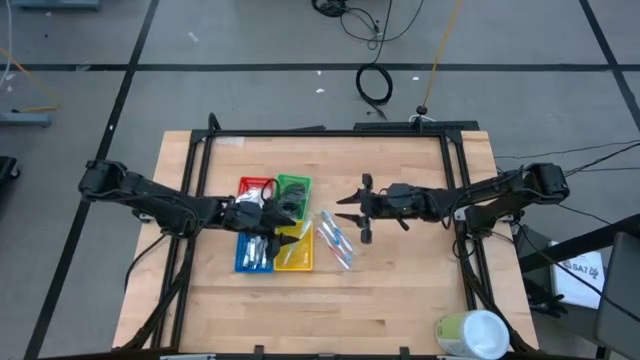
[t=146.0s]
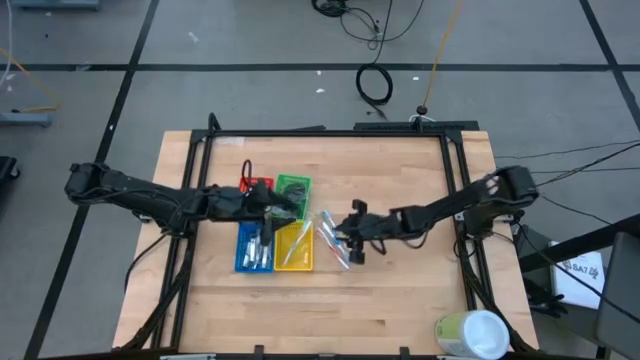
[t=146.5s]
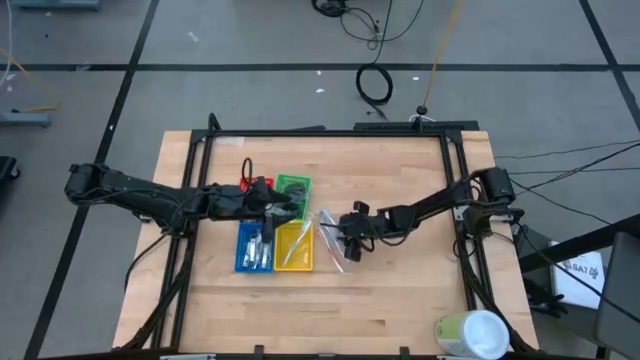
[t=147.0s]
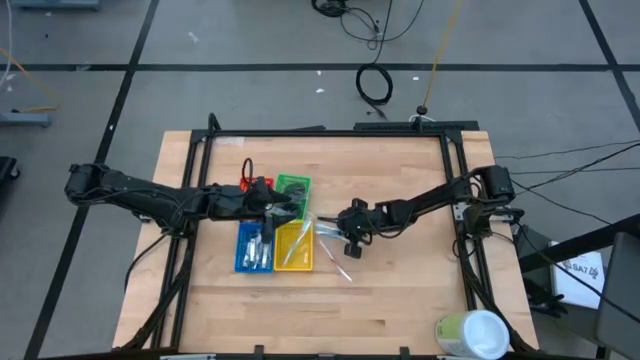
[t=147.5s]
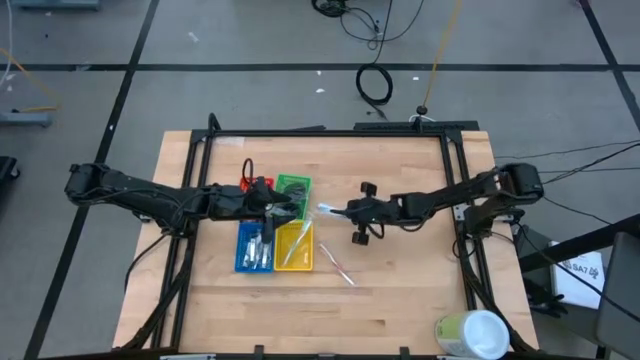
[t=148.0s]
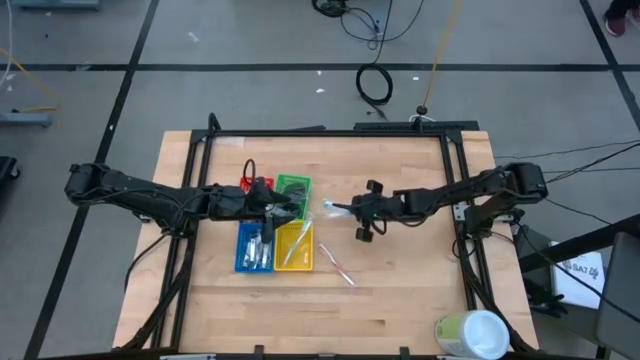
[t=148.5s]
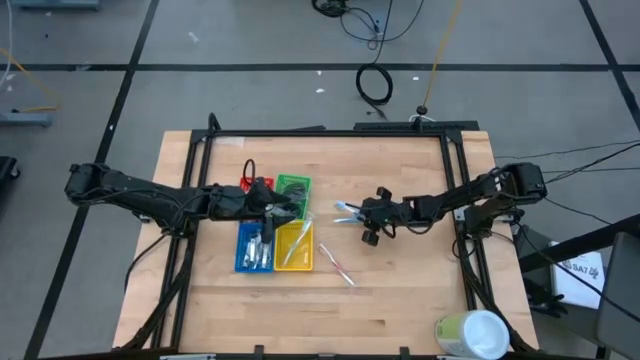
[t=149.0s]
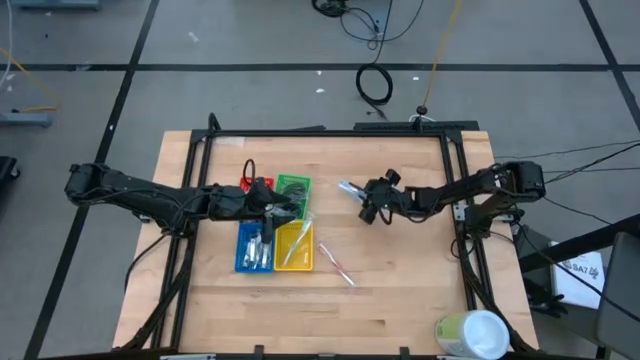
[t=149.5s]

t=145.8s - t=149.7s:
Task: Pick & Place Travel size toiletries
Put the blue toothbrush into the yellow bin

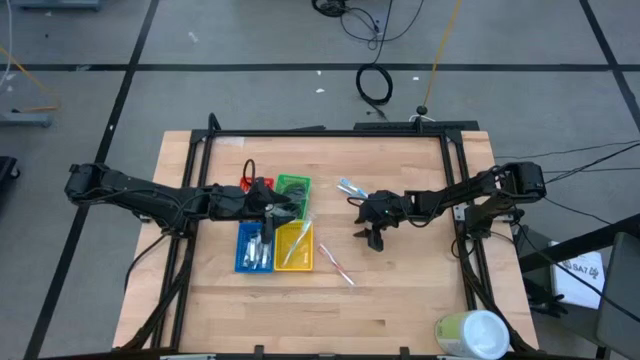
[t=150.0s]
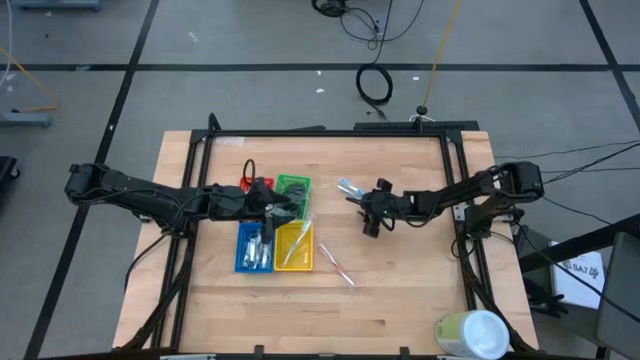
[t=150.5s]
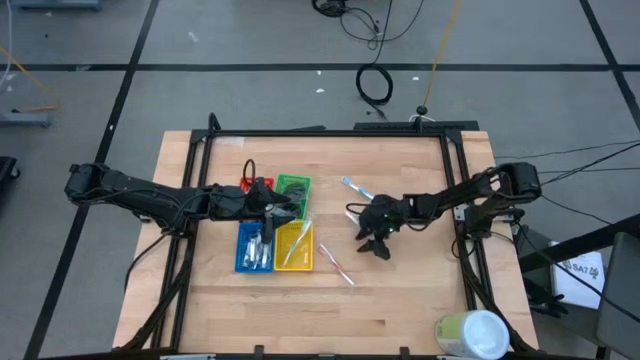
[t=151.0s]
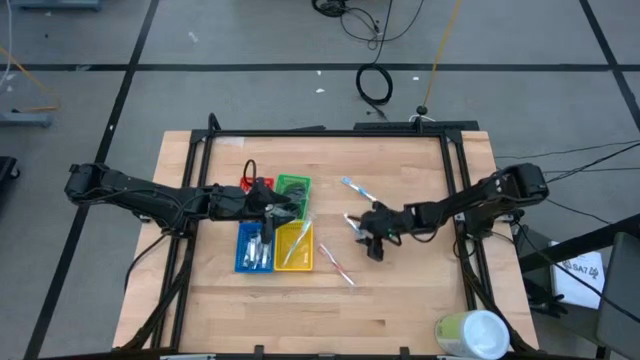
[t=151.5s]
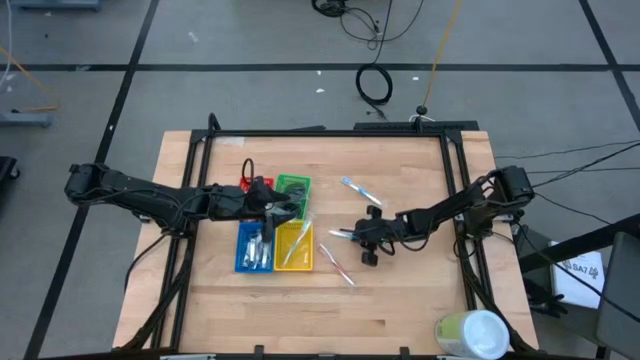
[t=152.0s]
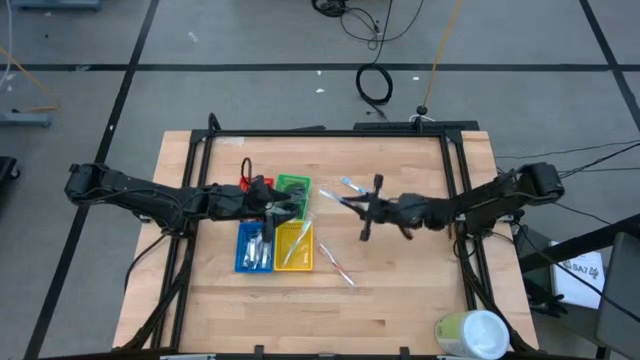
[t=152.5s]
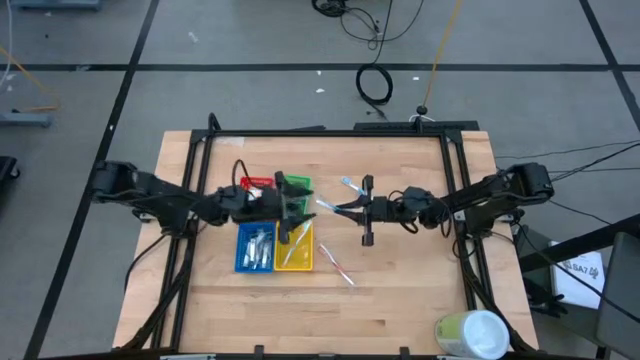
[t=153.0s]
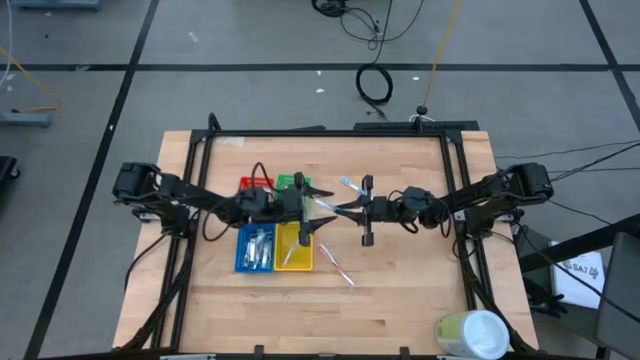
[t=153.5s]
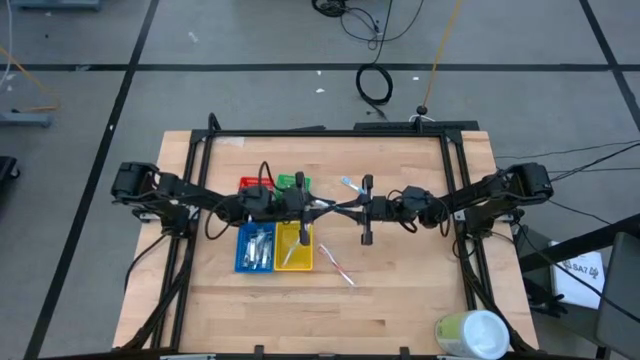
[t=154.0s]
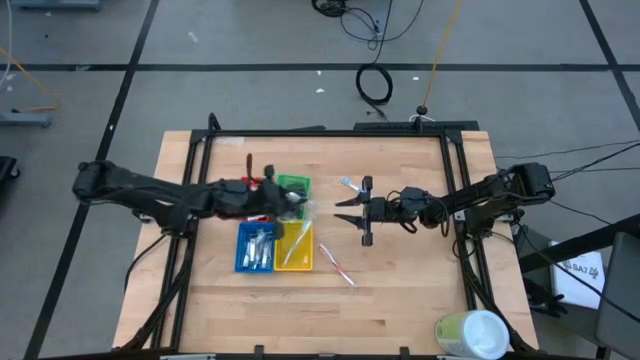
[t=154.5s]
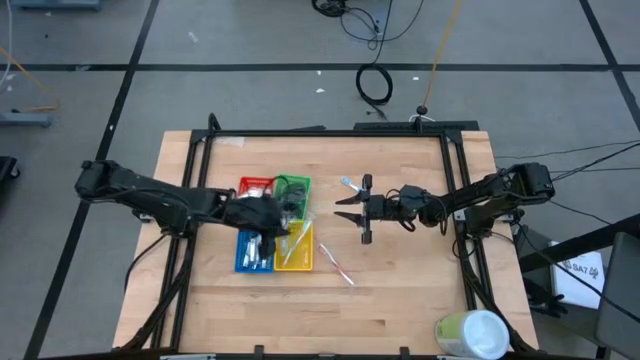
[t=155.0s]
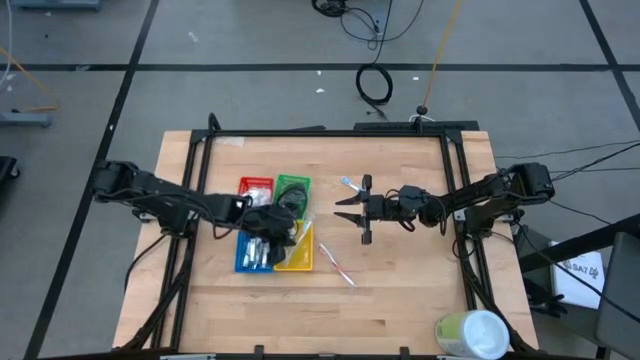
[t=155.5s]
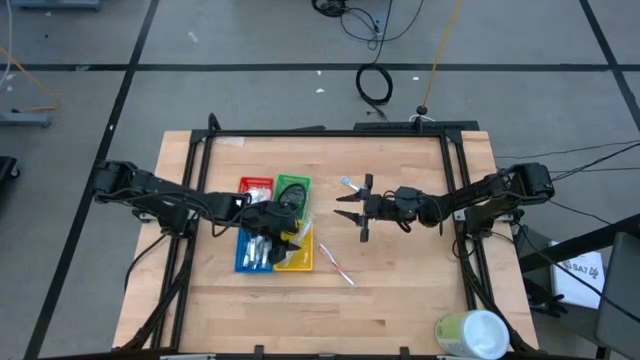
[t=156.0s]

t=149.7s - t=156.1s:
Put the blue toothbrush into the yellow bin

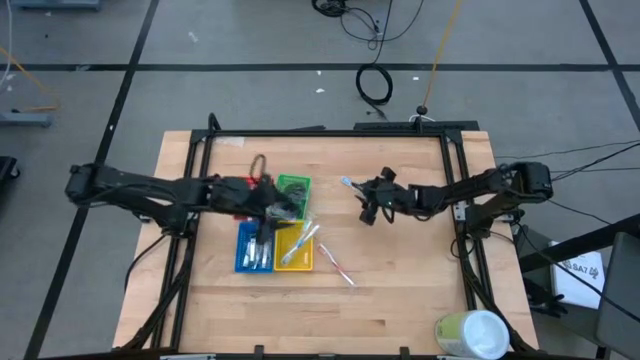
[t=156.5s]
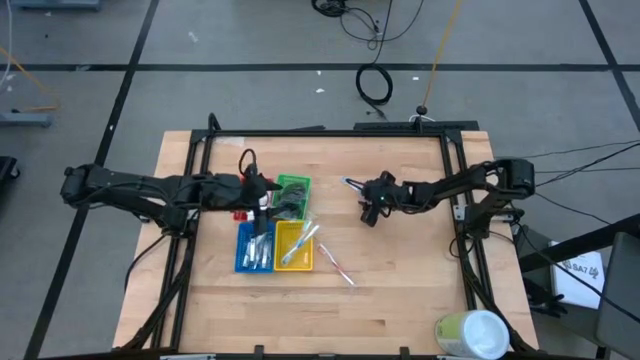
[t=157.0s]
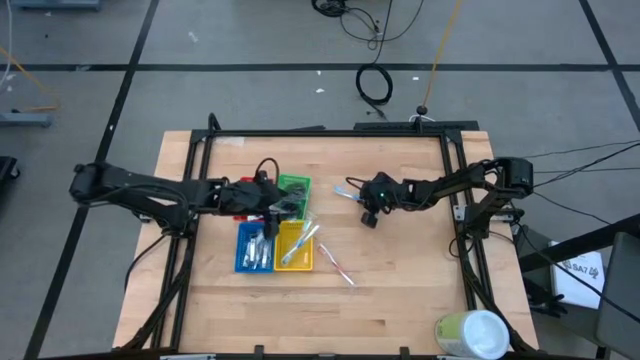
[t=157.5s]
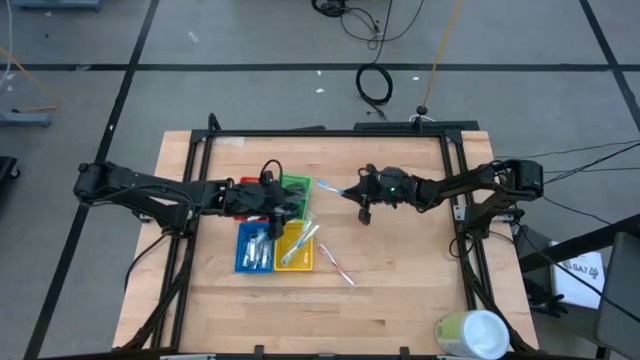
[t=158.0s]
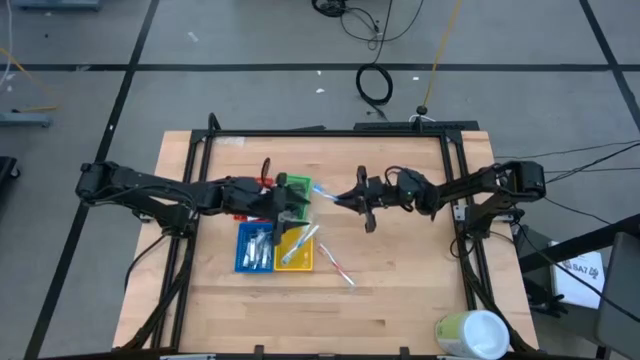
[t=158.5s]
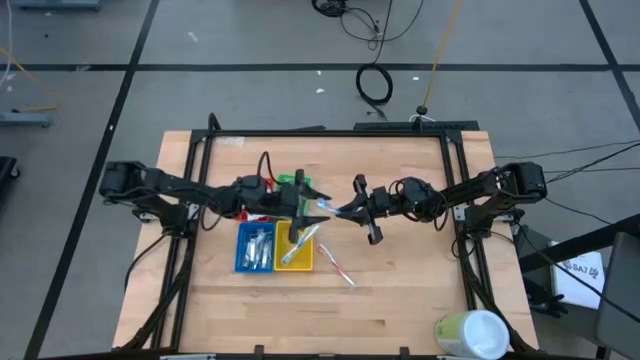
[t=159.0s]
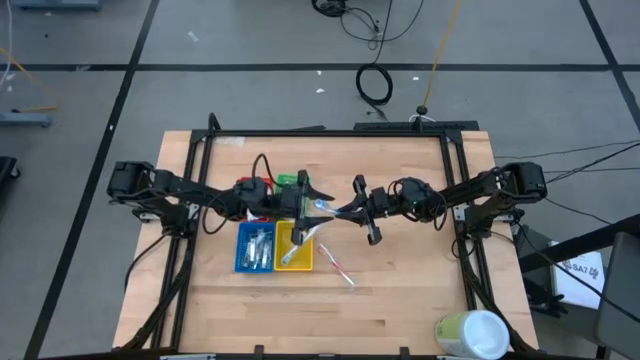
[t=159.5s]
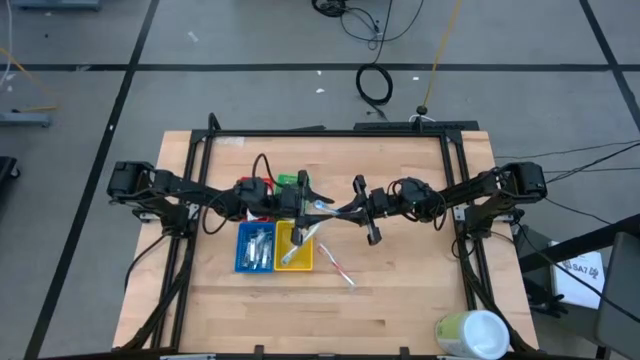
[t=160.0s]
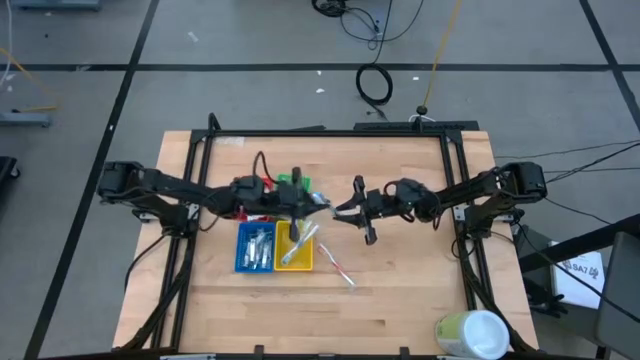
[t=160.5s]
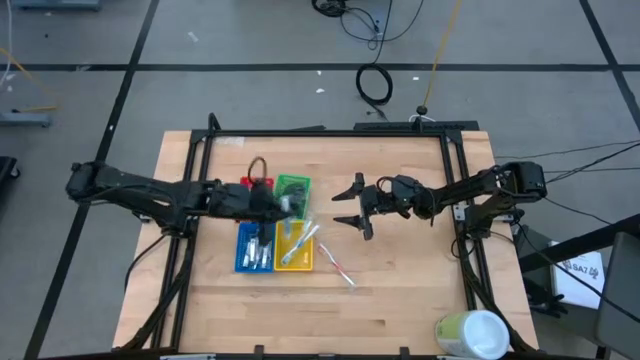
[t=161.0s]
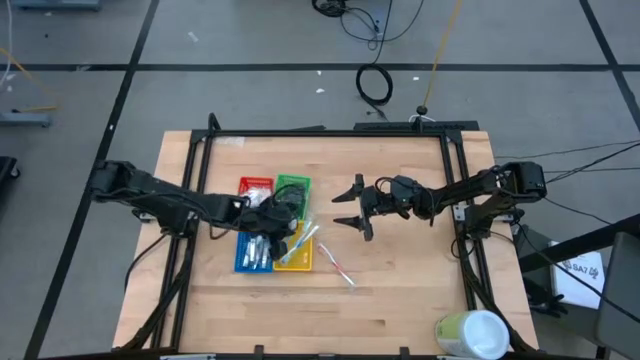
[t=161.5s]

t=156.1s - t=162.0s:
Put the blue toothbrush into the yellow bin

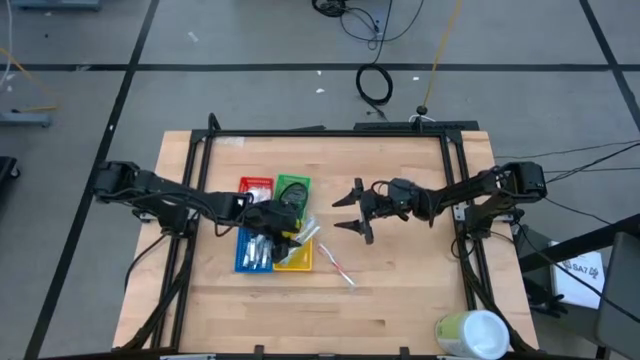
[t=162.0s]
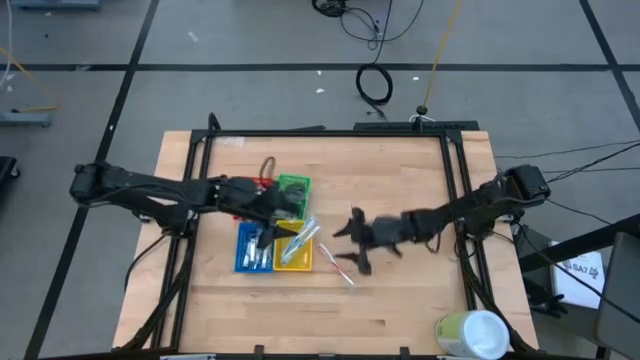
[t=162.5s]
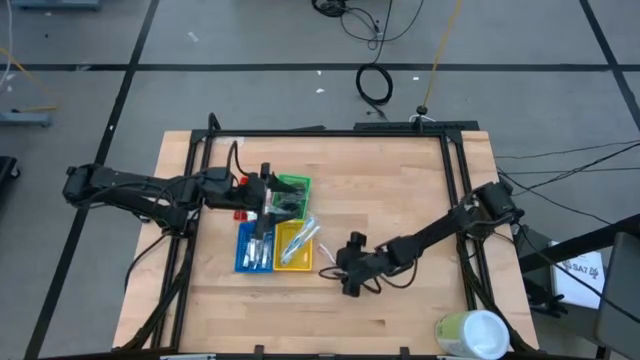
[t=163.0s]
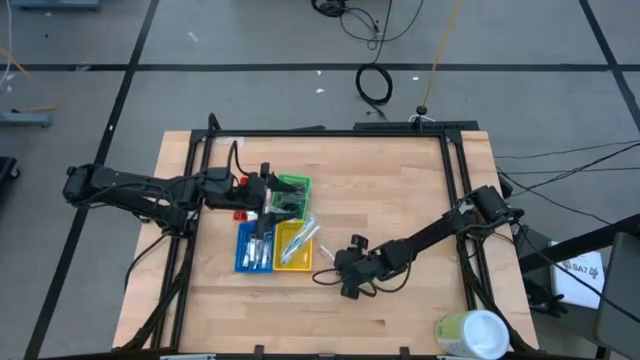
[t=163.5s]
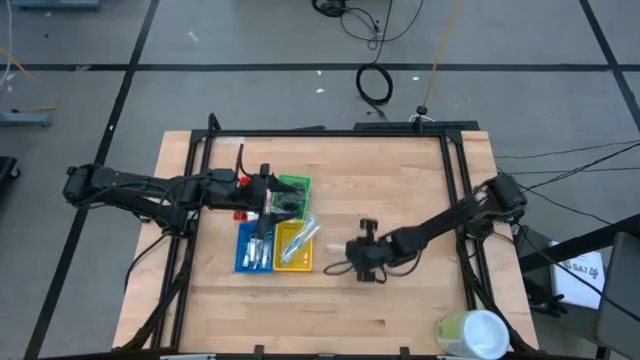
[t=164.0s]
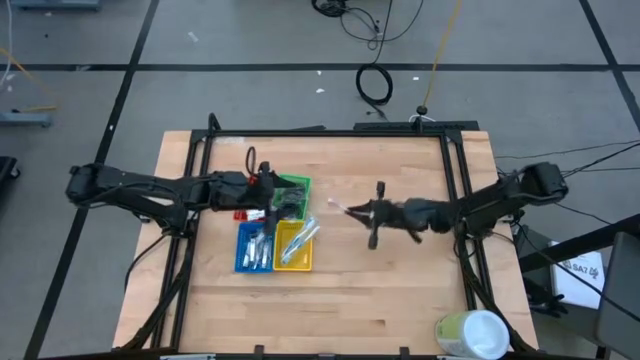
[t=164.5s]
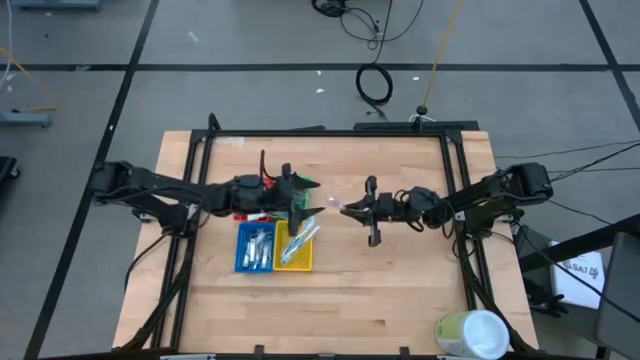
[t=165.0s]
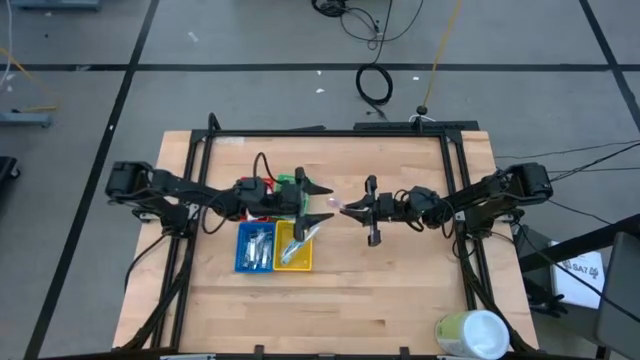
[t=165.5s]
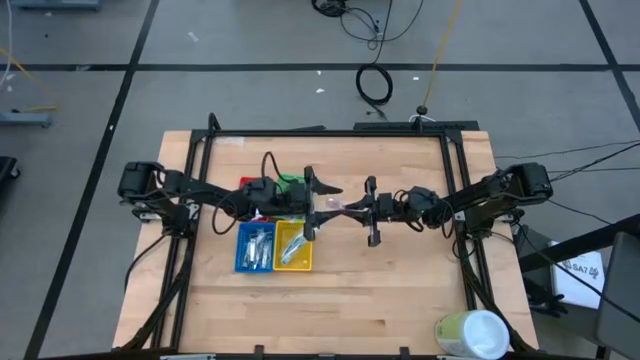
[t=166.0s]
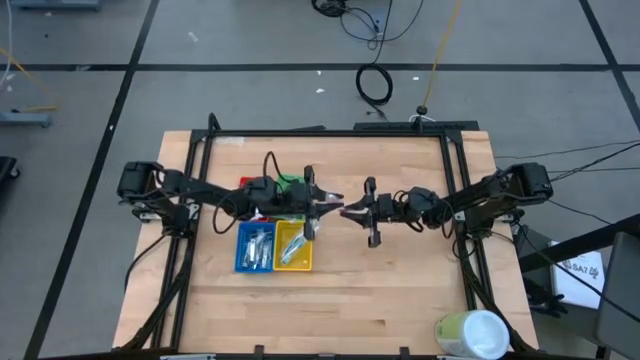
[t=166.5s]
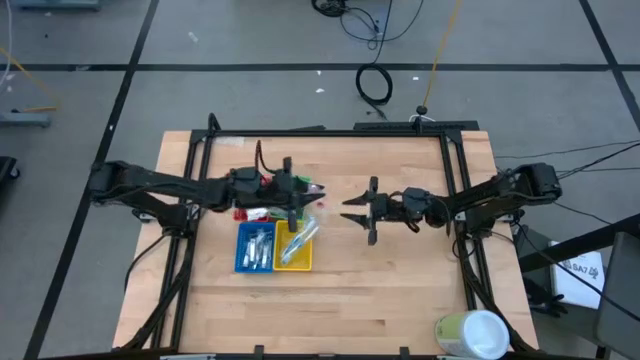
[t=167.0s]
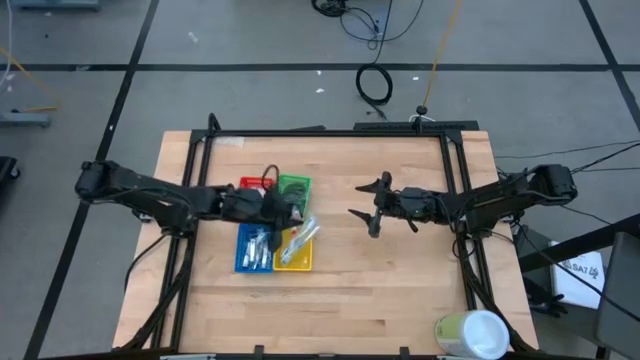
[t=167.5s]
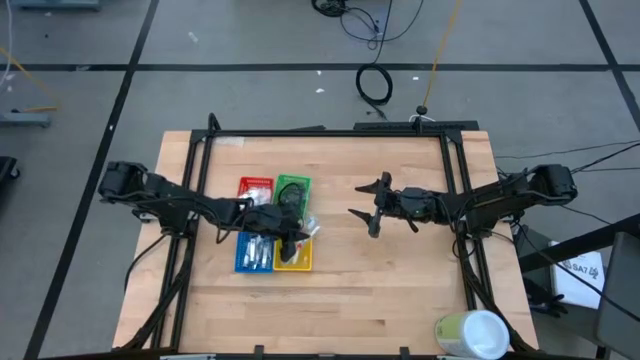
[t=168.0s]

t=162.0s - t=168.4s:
Put the orange toothbrush into the yellow bin
